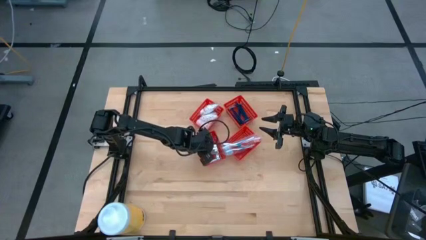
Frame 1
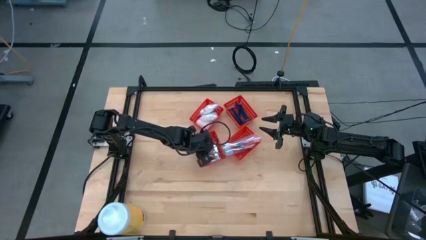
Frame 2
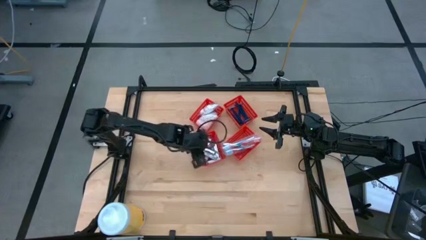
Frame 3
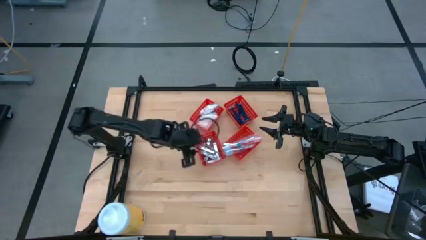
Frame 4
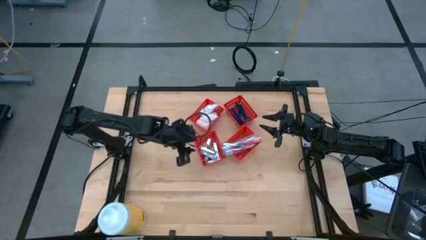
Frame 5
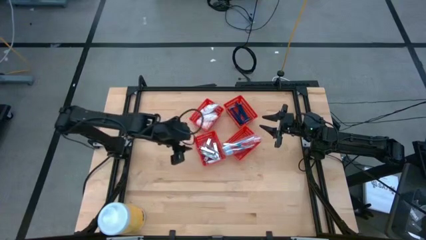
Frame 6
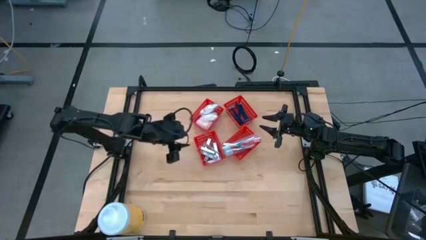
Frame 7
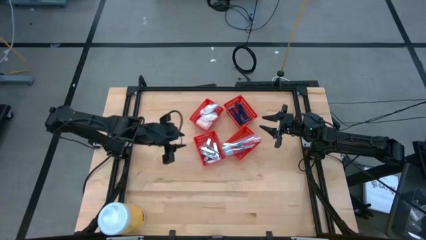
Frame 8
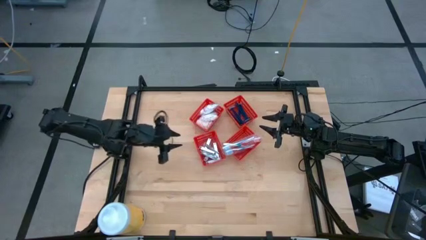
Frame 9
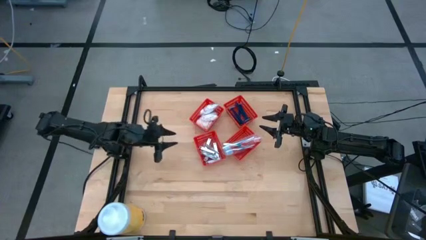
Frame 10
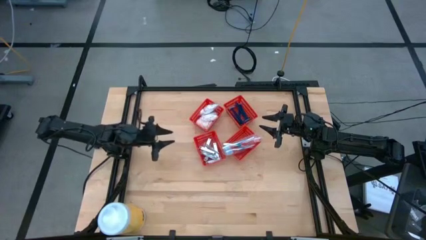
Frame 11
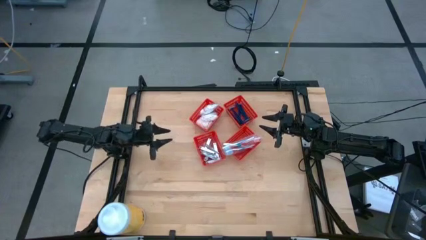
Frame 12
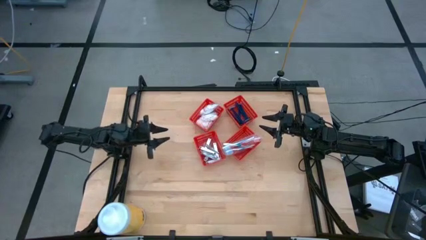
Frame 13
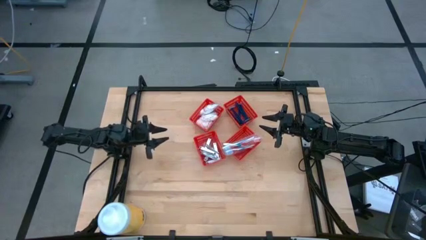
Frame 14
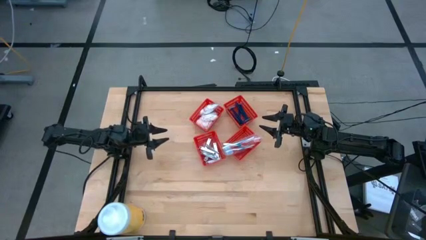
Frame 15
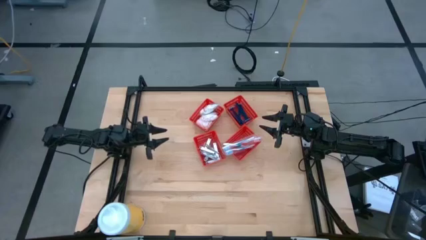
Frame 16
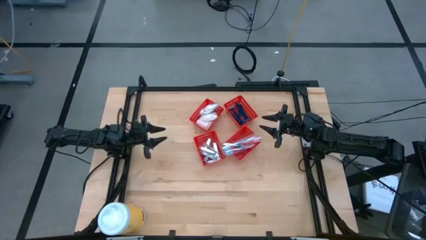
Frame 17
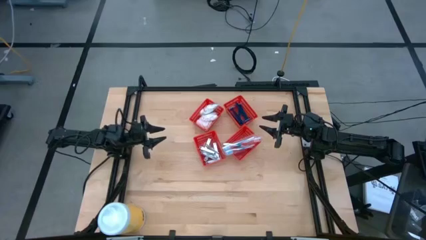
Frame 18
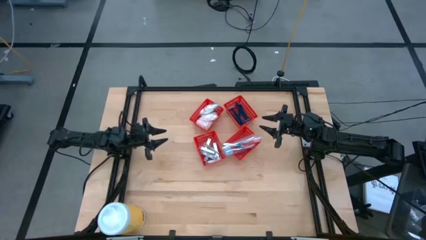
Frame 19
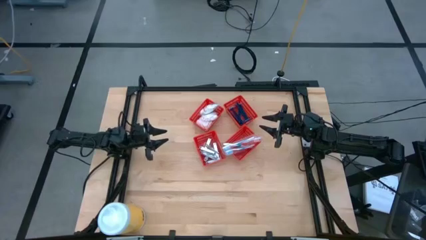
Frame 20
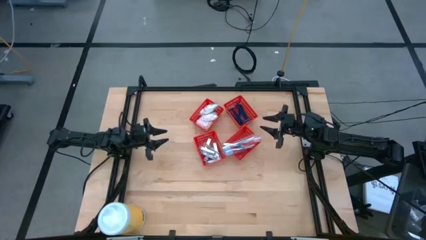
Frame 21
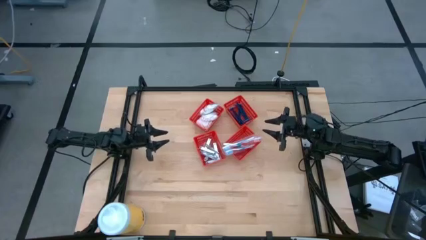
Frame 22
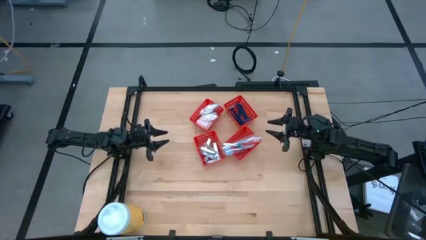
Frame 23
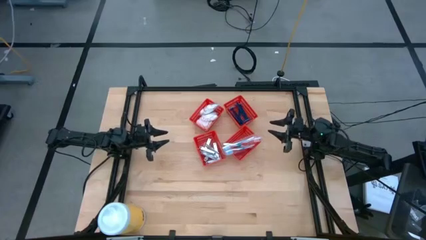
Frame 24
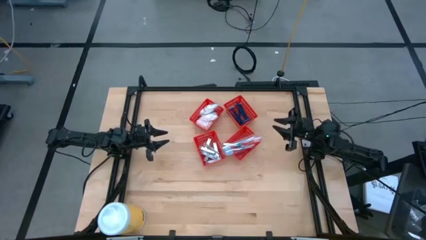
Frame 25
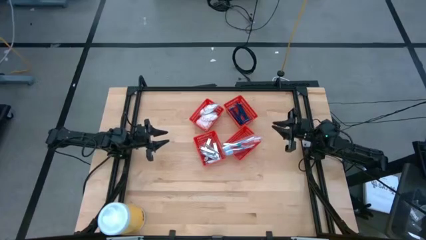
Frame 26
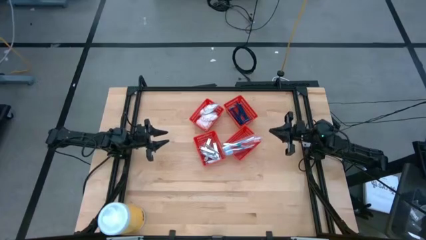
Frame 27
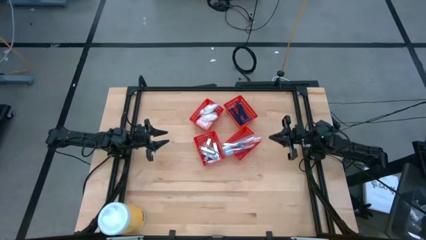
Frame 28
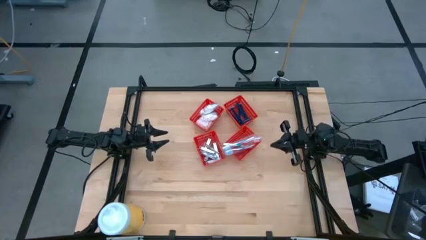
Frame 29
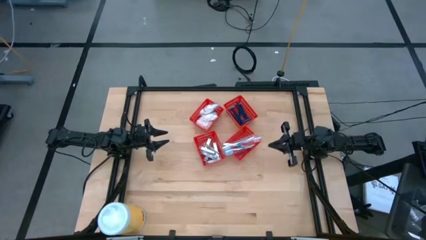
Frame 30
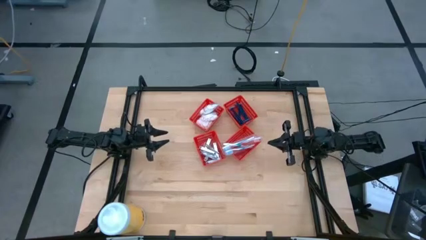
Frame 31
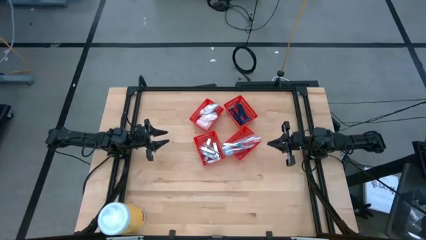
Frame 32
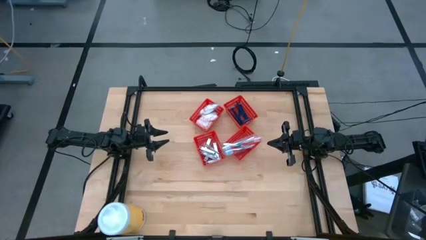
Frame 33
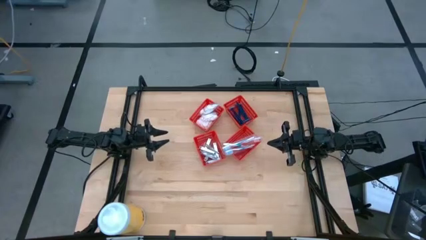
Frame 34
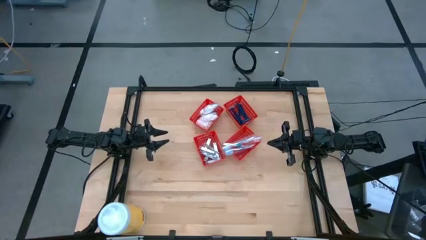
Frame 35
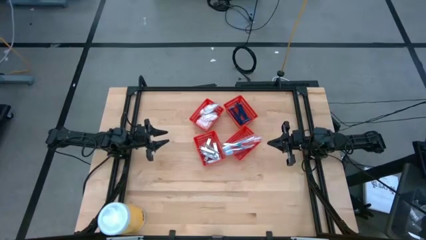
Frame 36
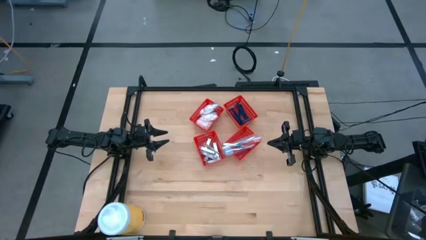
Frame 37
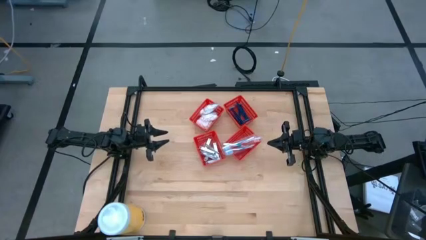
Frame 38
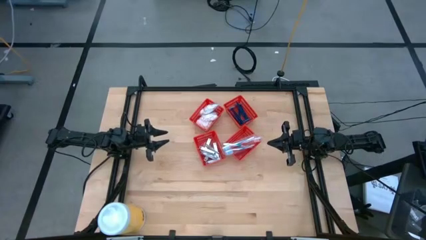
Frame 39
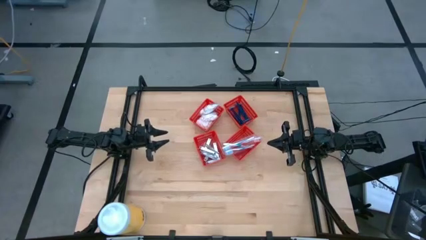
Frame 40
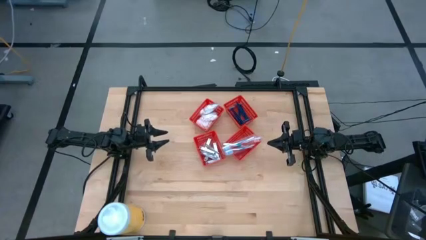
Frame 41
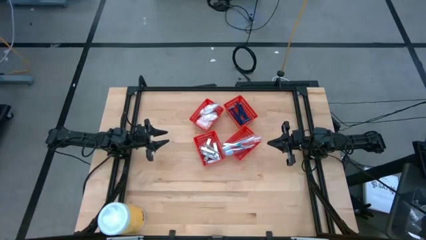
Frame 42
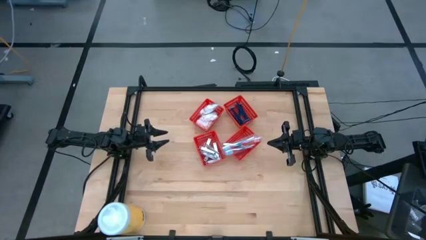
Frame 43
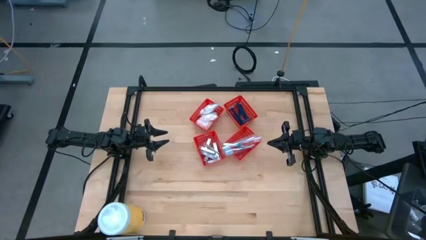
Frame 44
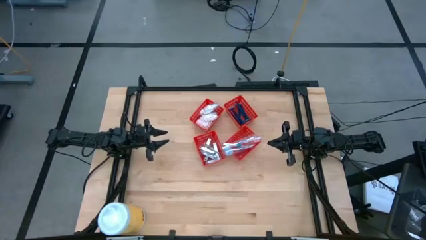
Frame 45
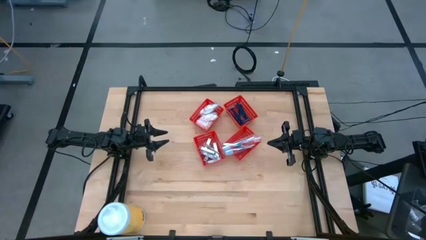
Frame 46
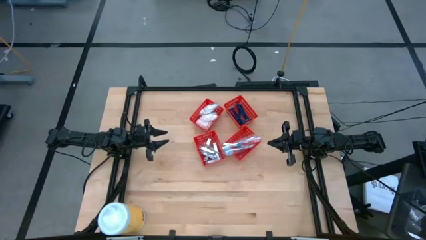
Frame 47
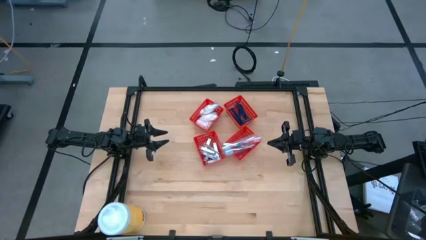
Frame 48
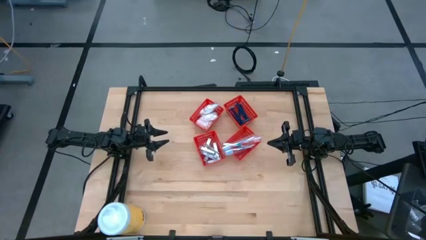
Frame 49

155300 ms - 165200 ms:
Task: Pick & Place Travel size toiletries
Return to Home Position

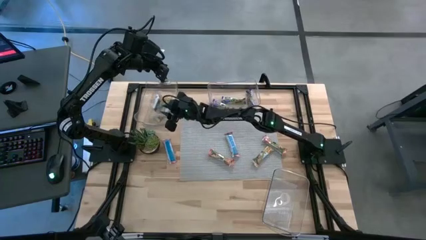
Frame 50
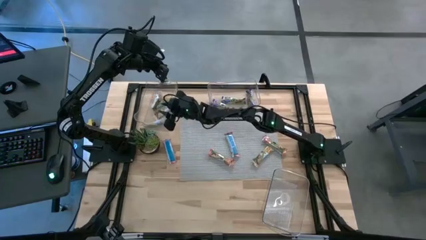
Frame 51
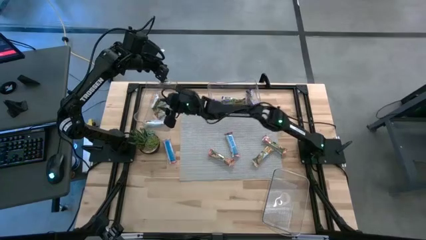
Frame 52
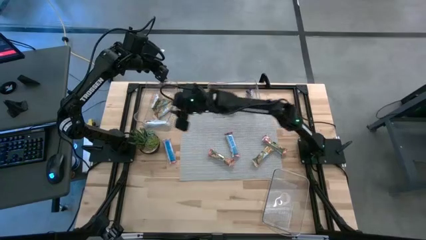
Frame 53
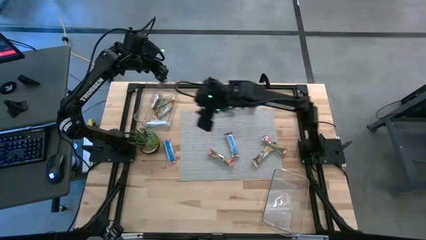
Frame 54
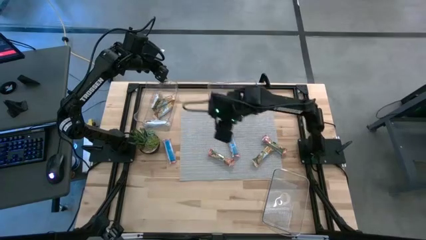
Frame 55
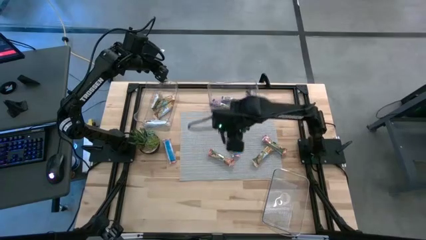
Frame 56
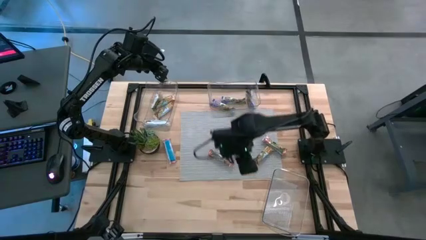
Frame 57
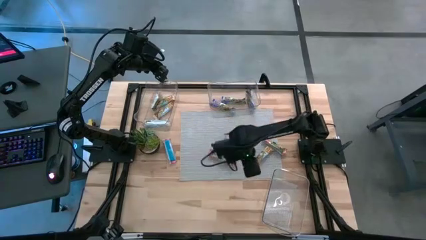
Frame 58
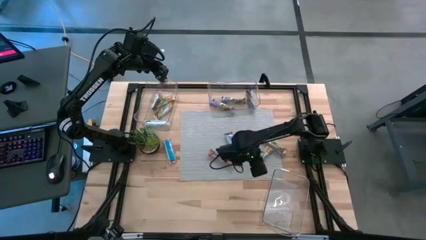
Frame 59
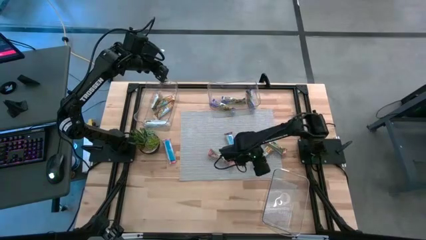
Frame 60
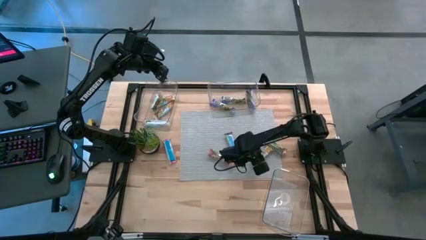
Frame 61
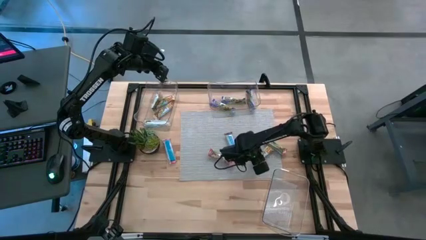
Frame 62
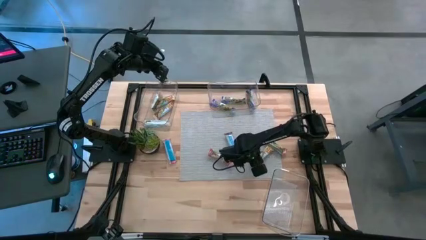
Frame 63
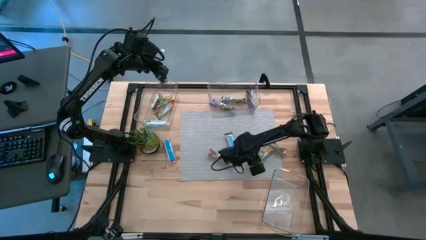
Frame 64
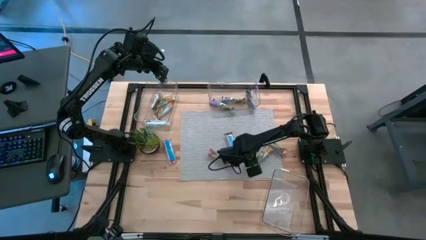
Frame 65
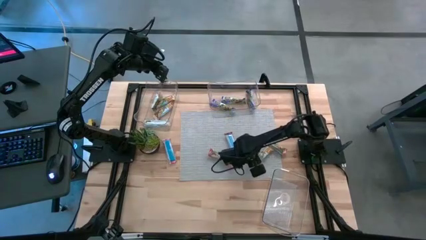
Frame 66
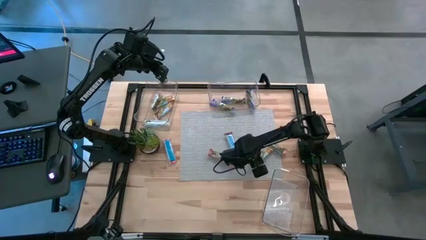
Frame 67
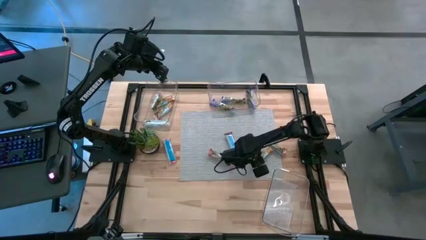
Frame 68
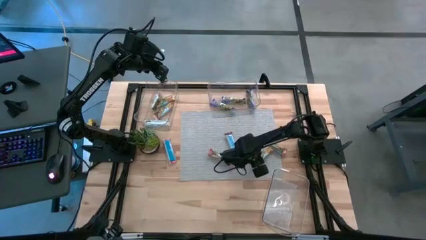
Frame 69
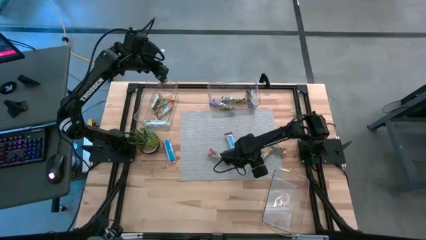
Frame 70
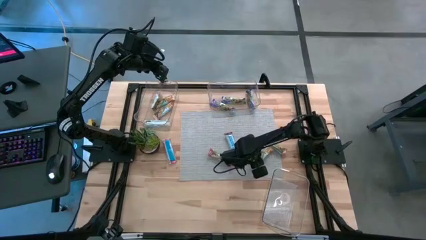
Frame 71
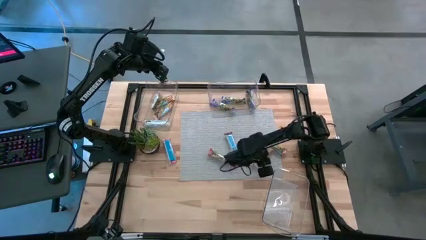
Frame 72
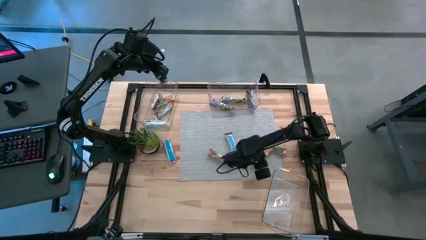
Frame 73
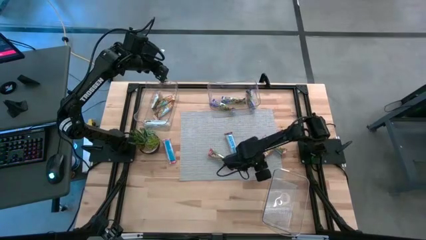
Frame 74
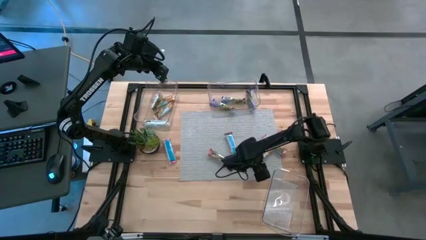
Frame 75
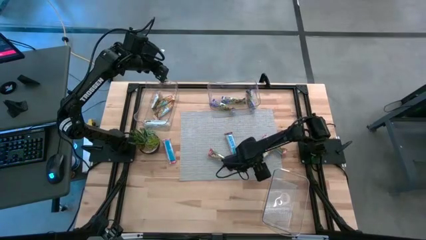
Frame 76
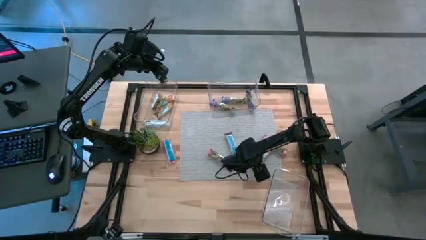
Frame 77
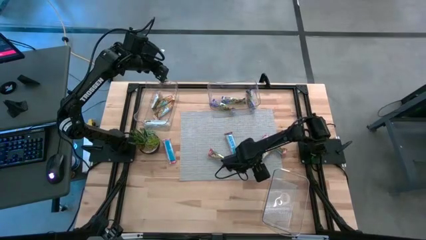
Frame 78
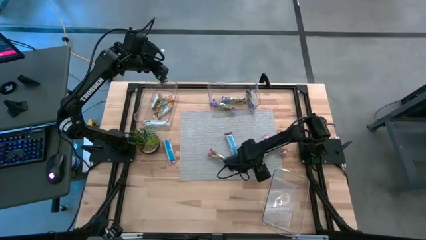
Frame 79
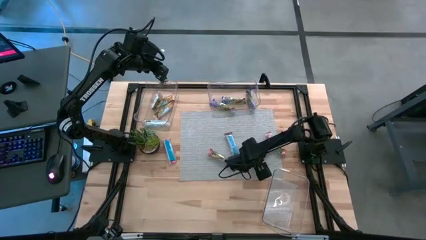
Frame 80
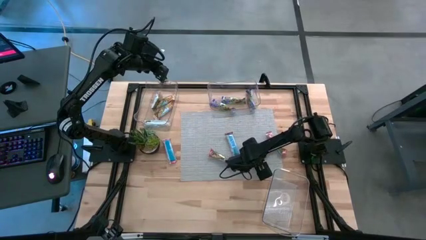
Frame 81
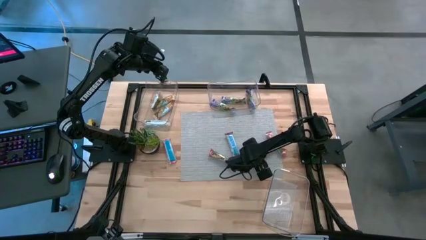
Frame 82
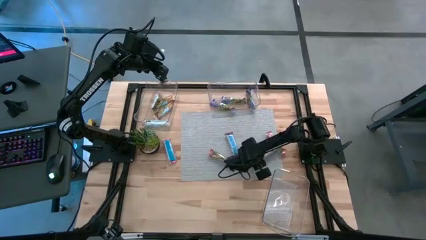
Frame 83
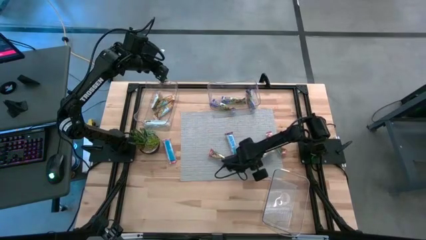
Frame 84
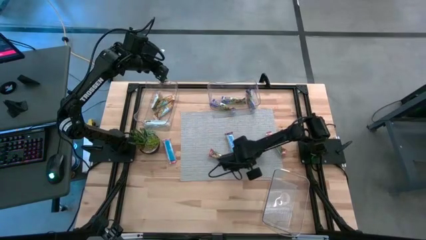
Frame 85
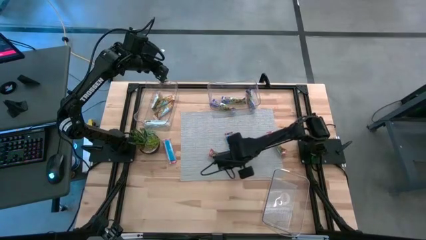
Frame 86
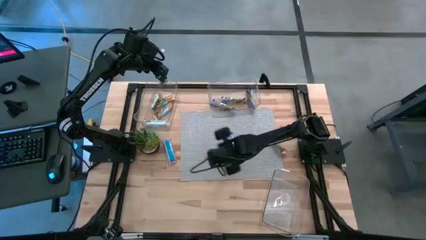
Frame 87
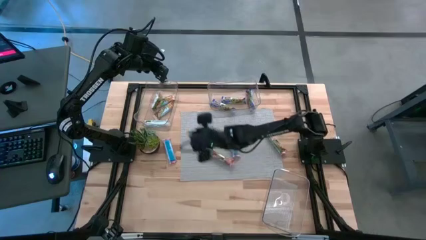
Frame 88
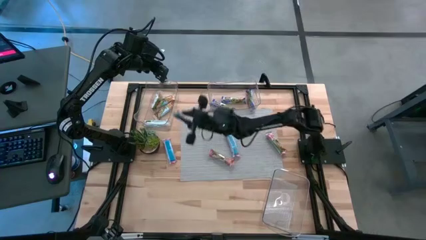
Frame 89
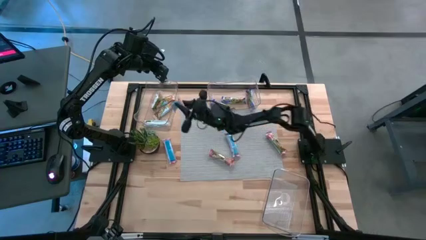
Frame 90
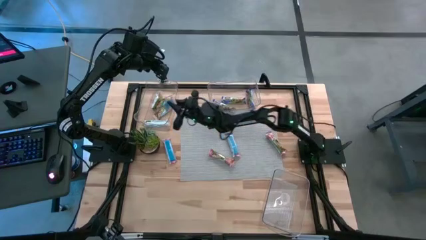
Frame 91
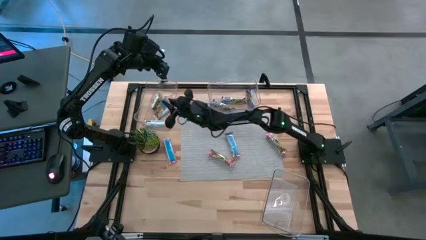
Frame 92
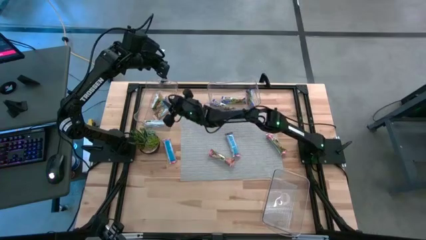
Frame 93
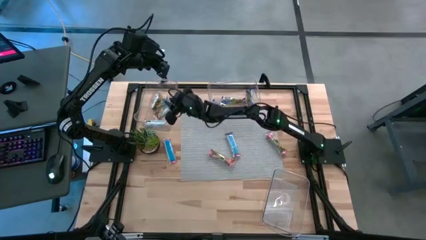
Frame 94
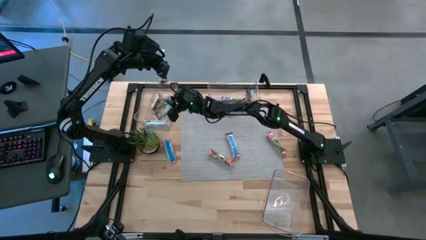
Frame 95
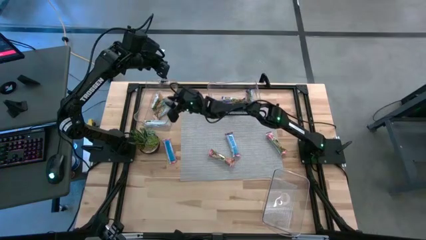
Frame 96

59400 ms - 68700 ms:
Task: Pick and place Granola Bars by type
Put the yellow granola bar into the left transparent bin
